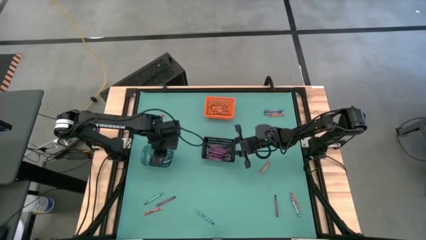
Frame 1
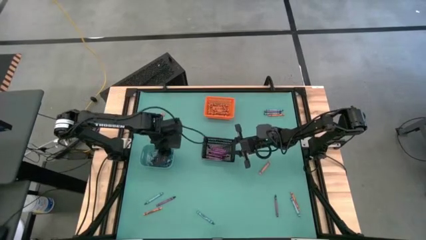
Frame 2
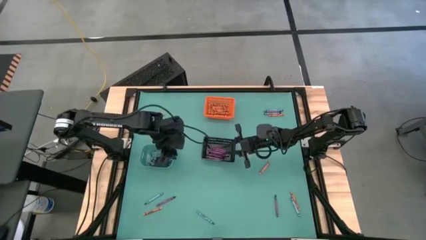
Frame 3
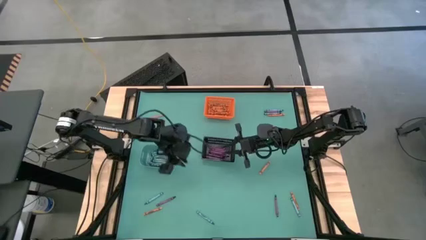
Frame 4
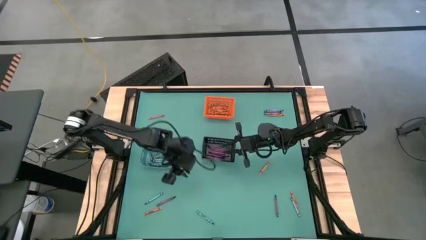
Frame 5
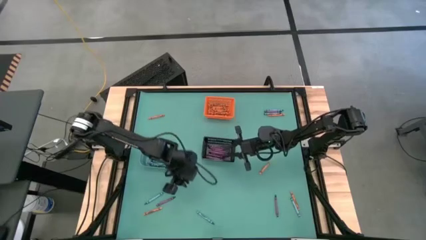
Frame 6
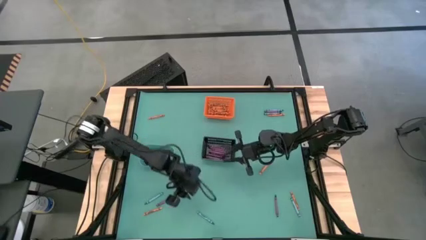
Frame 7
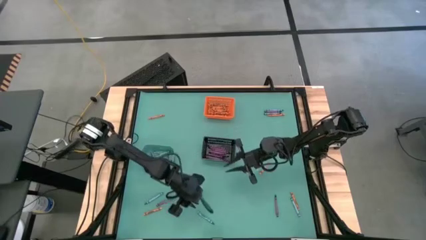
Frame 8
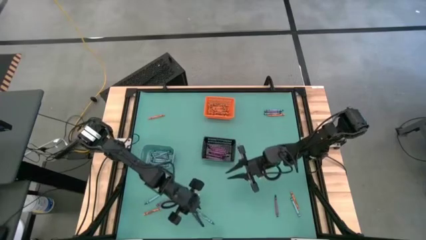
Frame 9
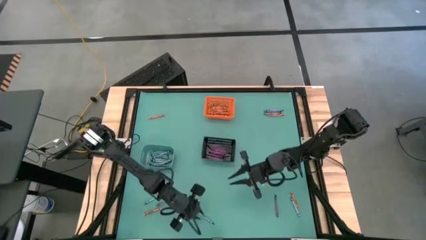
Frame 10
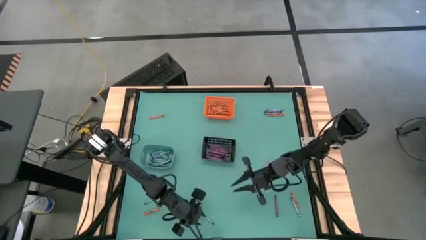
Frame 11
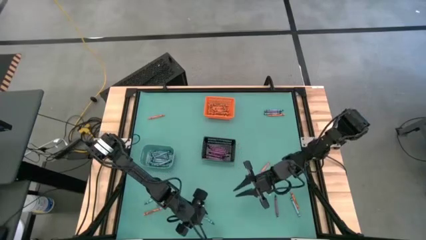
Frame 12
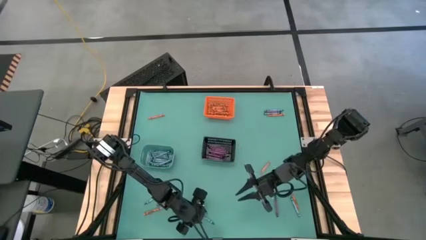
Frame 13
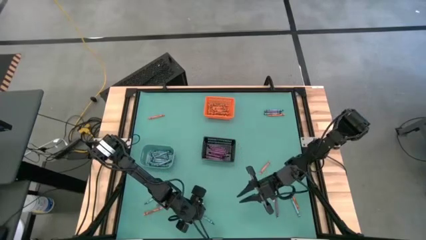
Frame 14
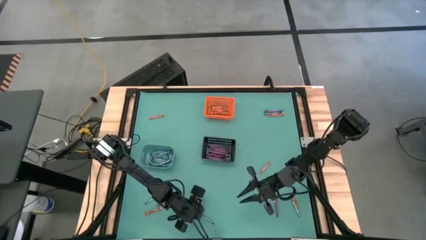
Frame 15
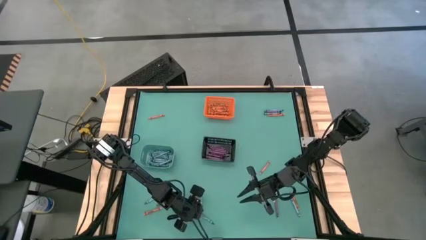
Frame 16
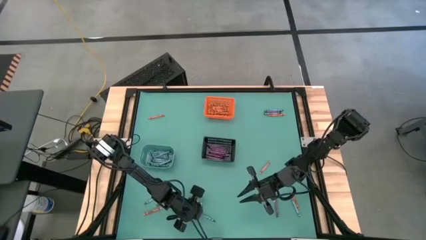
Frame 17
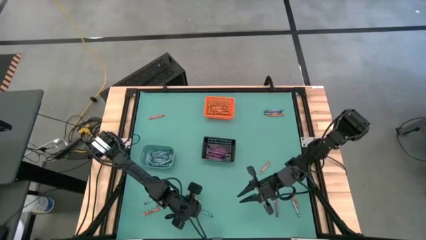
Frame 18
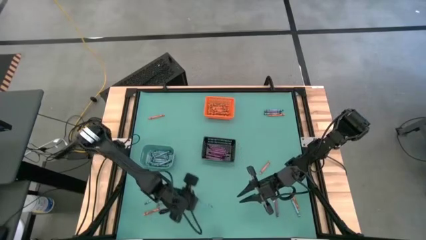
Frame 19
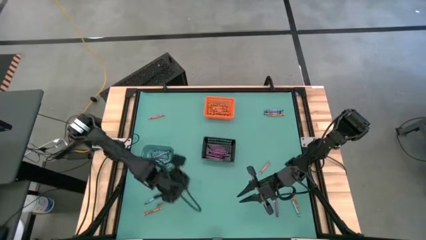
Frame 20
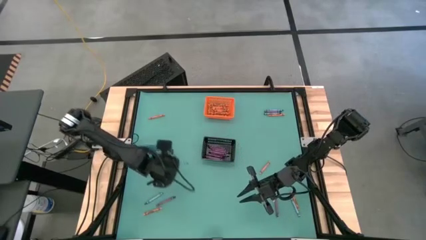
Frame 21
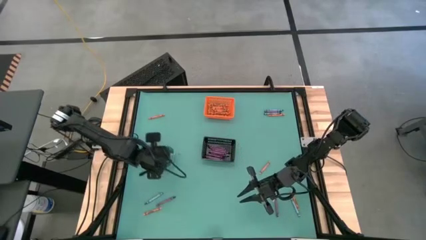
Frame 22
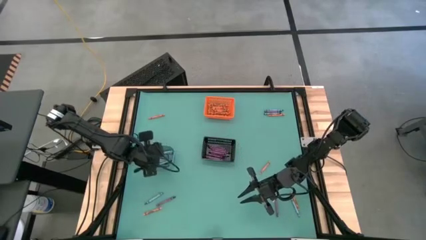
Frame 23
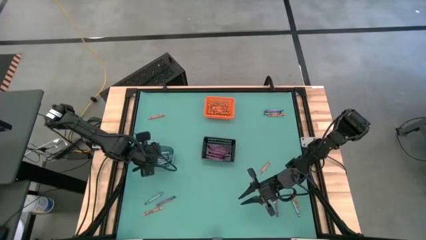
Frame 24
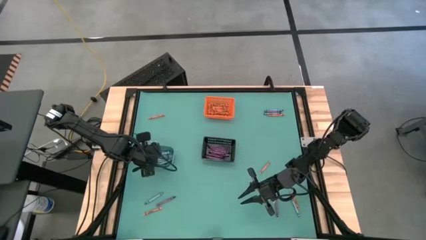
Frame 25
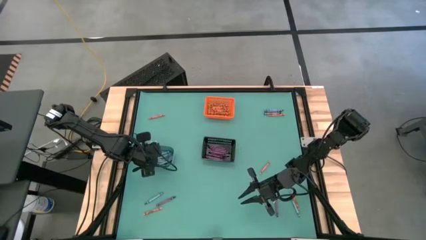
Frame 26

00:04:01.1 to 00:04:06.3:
Task: Sort crayons
Put the blue crayon into the light blue bin

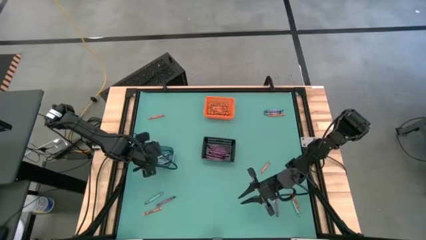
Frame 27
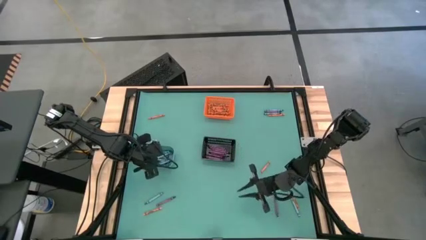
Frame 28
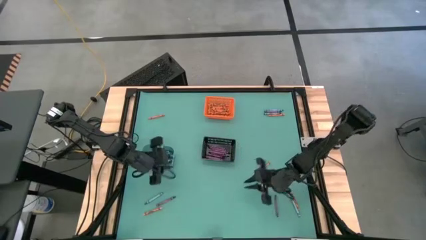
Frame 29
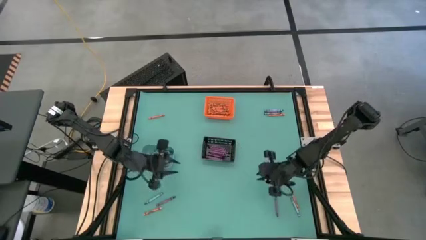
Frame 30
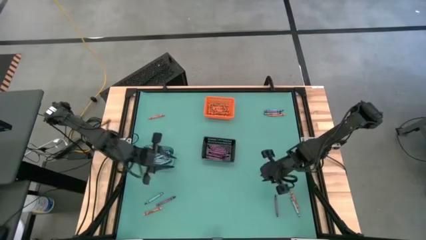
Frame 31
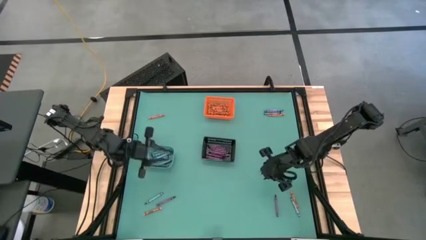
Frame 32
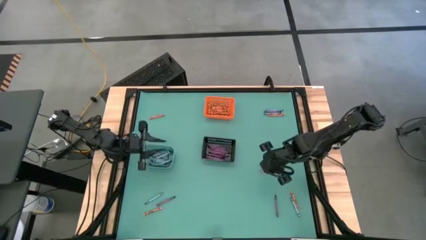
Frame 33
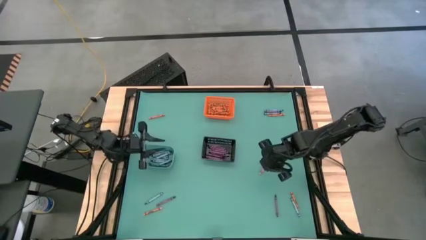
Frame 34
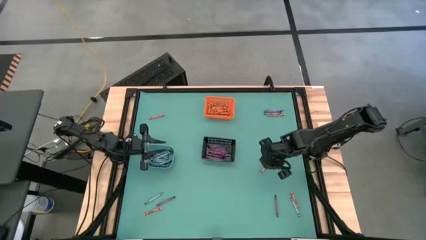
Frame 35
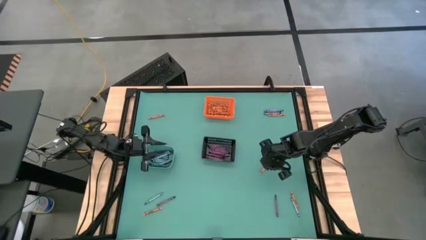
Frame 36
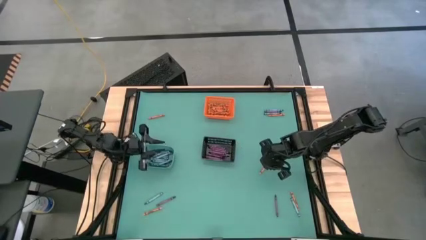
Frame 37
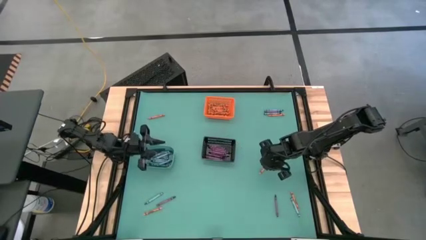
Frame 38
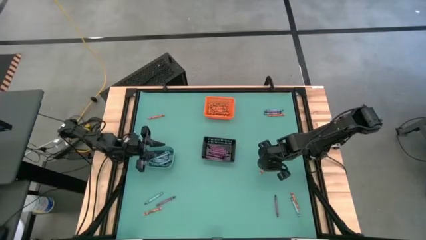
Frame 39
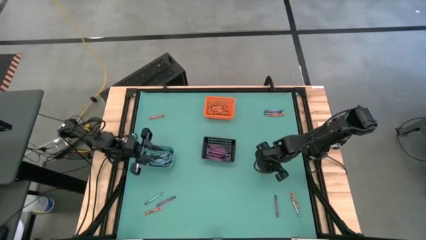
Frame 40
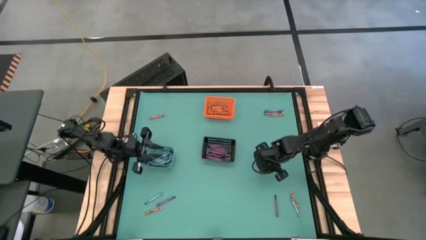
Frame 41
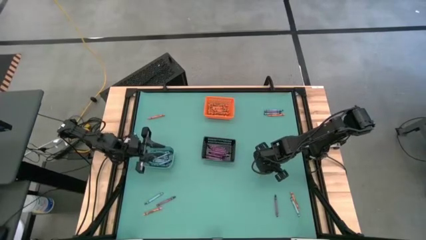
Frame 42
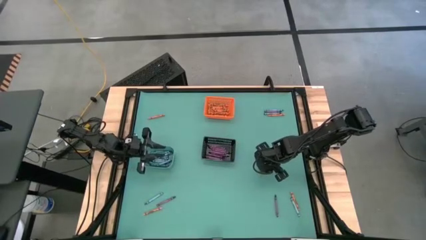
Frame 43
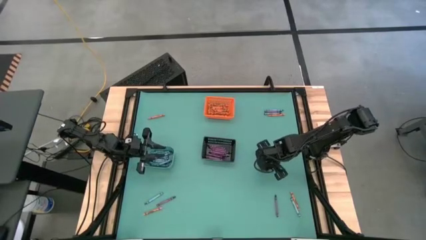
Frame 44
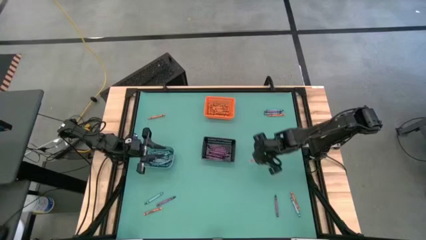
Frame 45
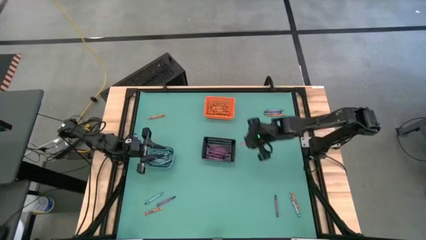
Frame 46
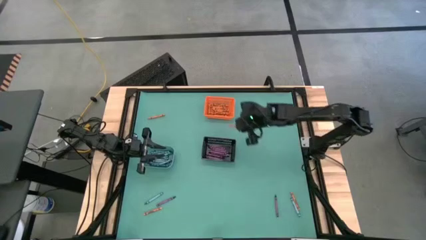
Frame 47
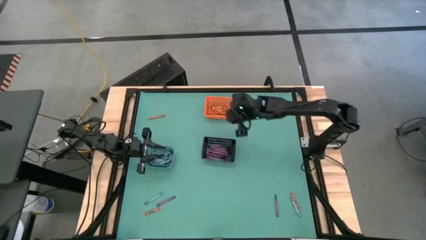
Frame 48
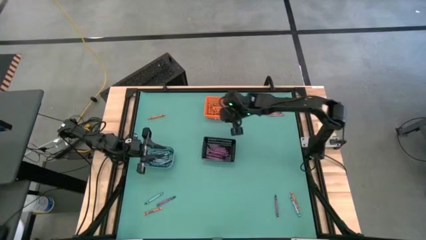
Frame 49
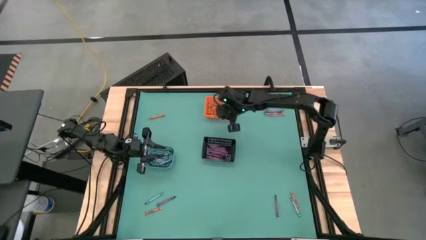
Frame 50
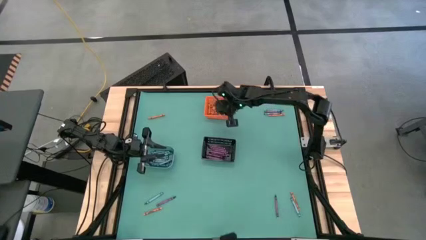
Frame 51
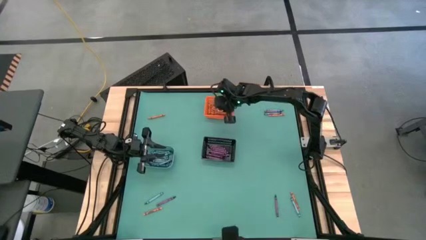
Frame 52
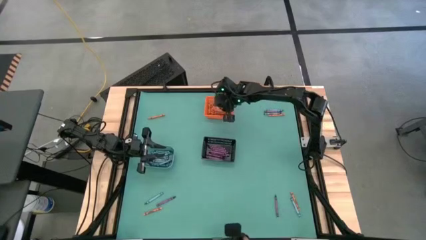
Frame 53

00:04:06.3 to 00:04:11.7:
Put the orange crayon into the orange bin

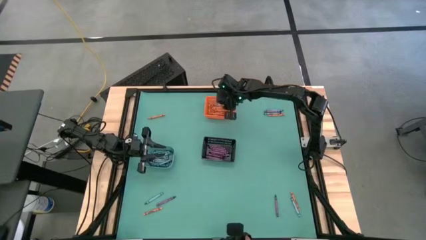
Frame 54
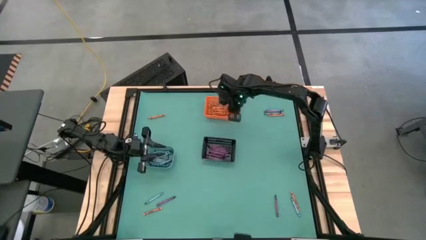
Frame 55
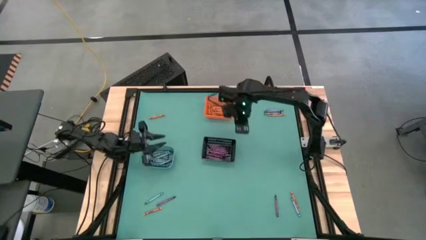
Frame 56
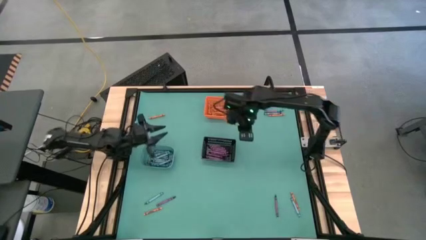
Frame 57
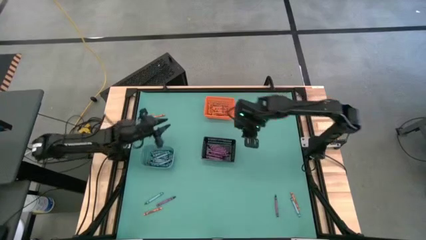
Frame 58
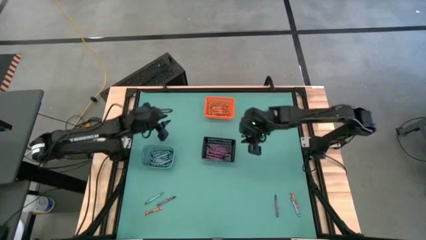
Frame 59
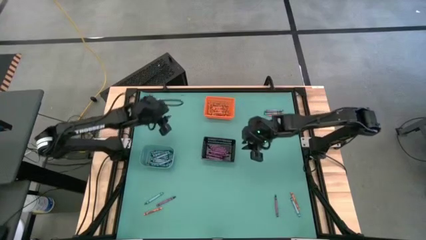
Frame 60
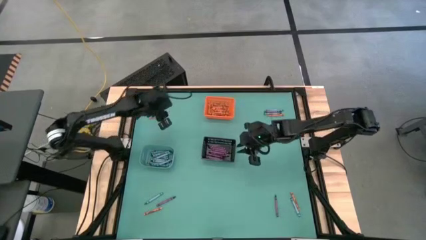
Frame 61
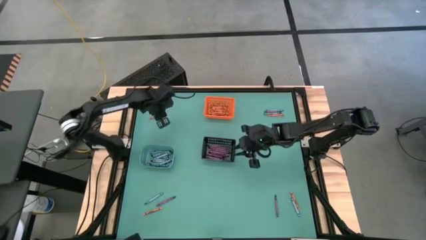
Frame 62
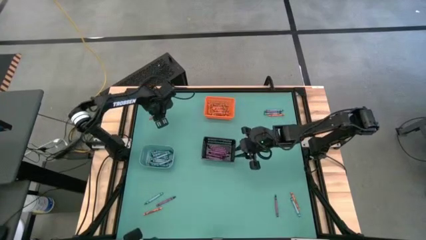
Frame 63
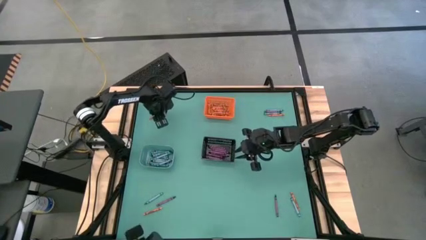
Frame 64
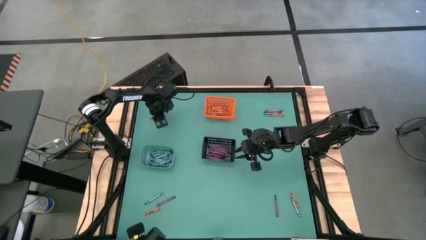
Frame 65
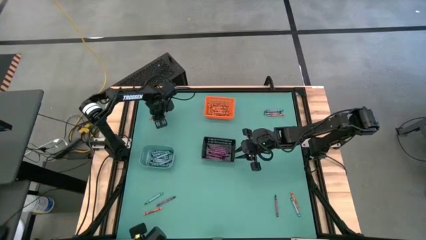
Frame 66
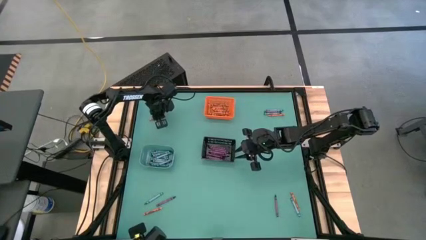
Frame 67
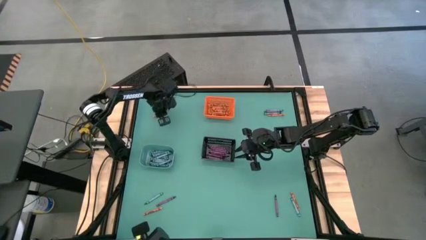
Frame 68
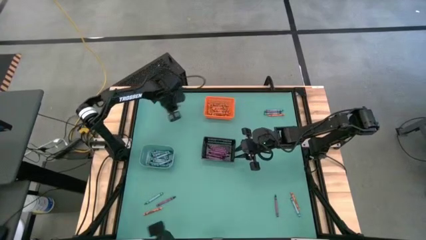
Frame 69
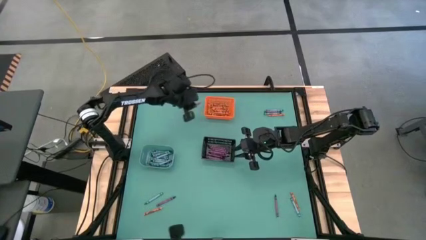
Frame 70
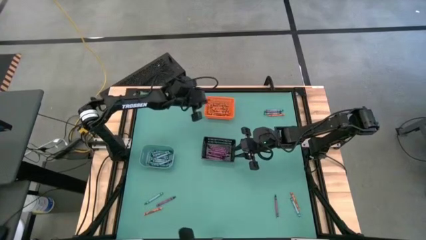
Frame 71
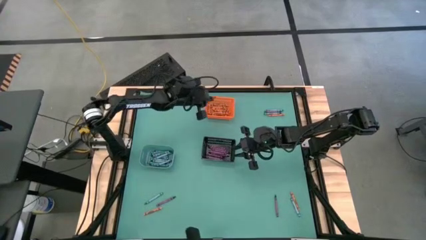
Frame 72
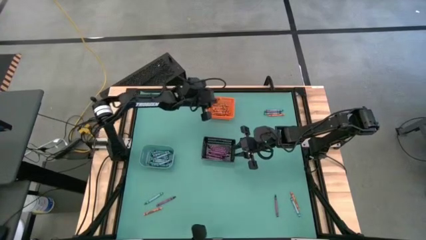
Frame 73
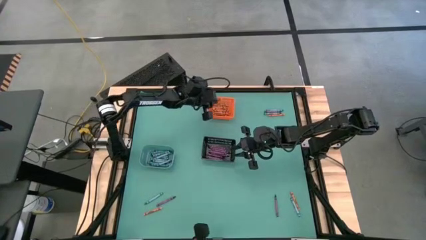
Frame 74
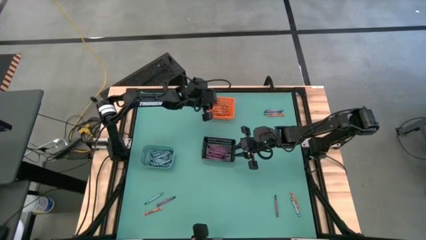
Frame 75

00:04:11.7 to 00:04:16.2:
Put the orange crayon into the orange bin

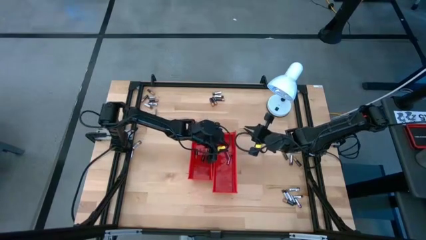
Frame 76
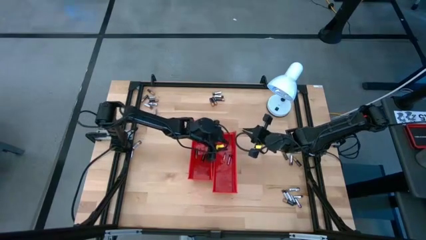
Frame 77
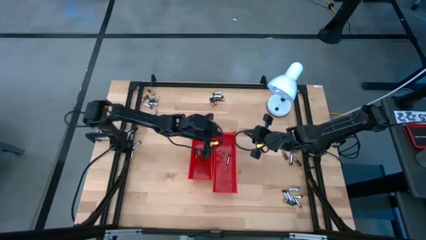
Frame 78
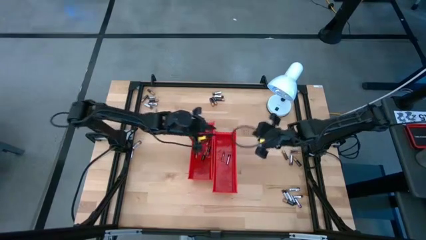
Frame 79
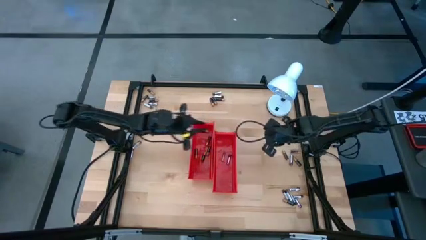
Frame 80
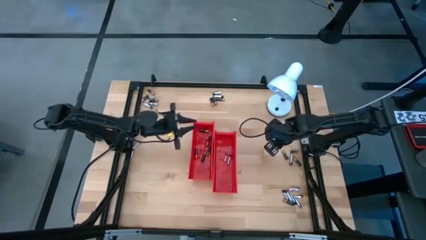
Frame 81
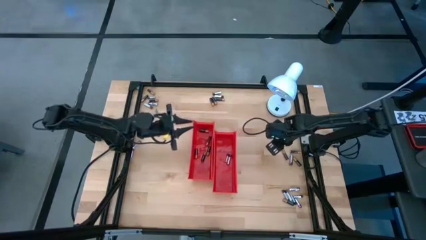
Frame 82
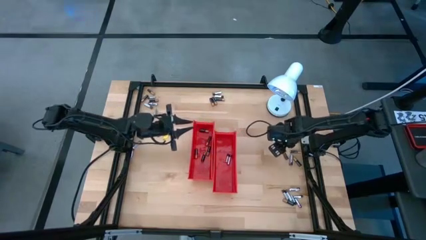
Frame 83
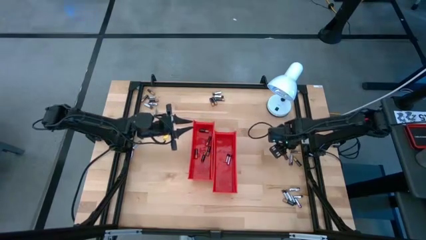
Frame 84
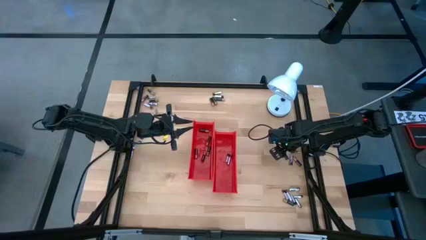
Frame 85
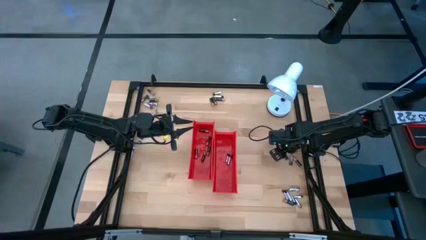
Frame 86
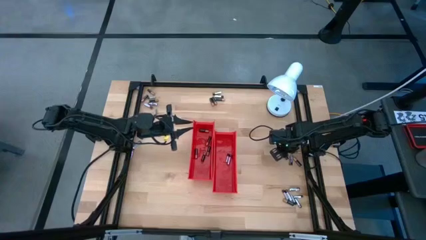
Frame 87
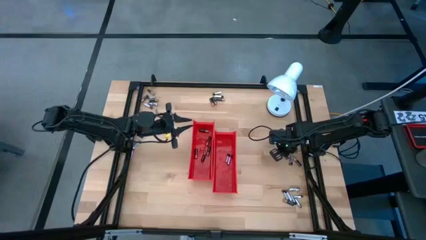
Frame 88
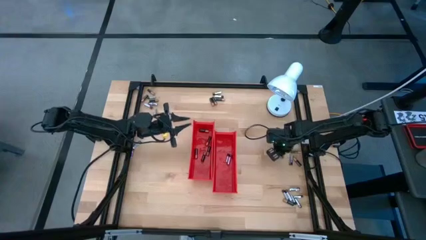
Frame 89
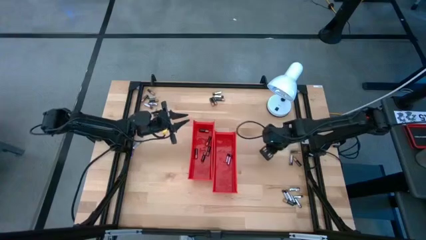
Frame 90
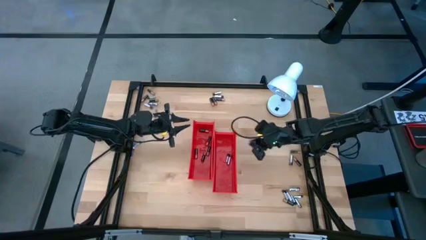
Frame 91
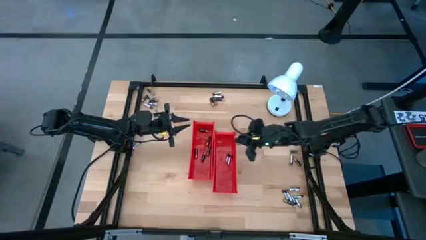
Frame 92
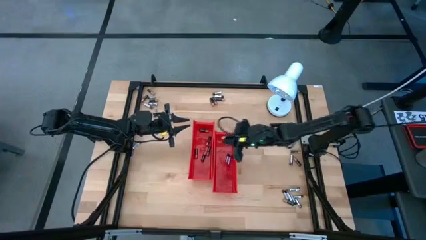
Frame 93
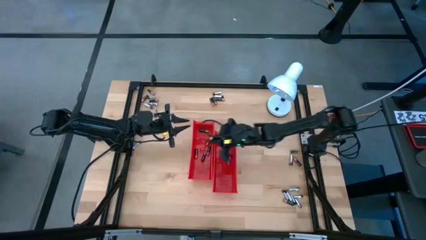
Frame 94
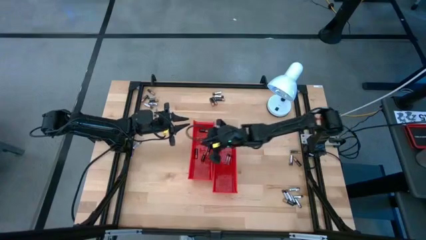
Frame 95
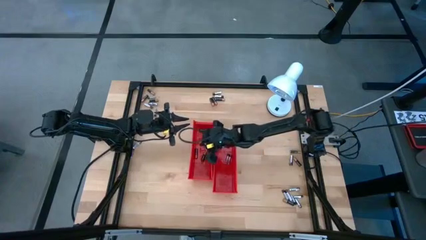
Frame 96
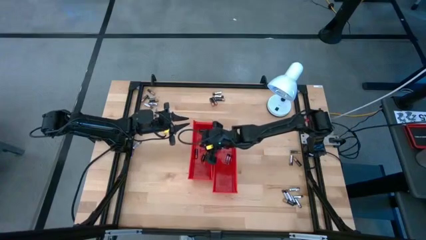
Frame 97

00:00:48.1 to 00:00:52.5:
Task: Sort batteries
Put the black battery into the left red bin
